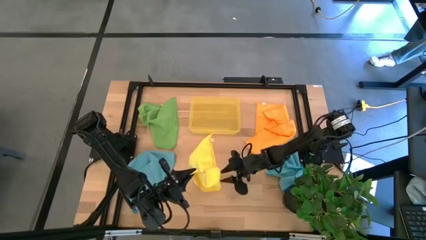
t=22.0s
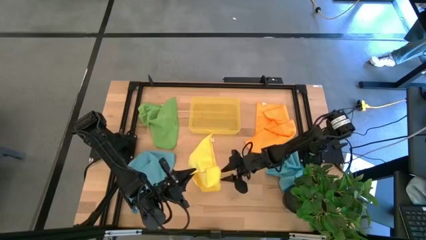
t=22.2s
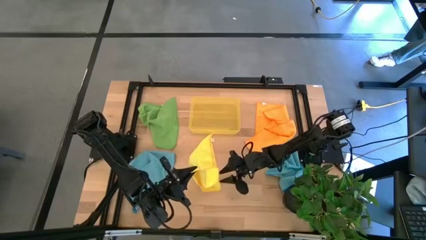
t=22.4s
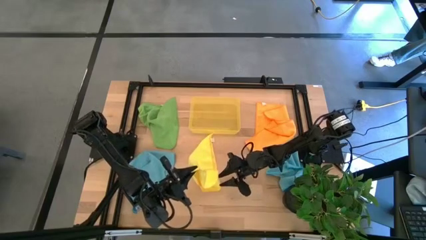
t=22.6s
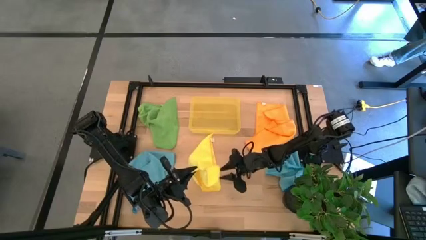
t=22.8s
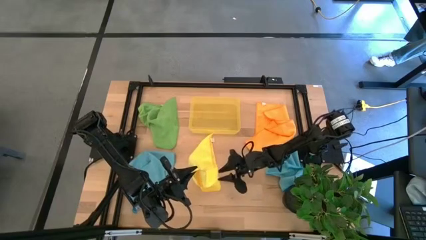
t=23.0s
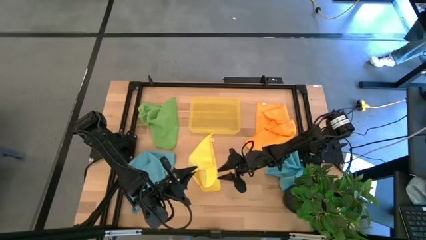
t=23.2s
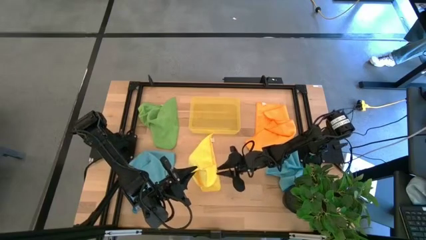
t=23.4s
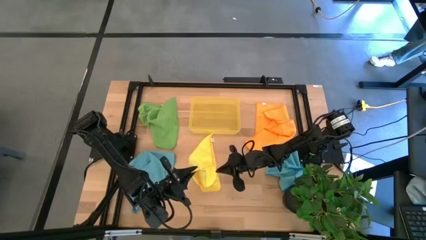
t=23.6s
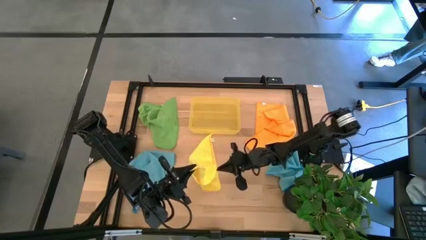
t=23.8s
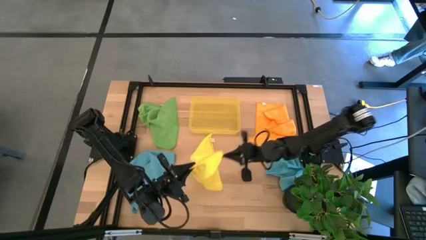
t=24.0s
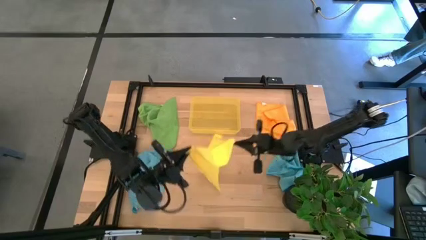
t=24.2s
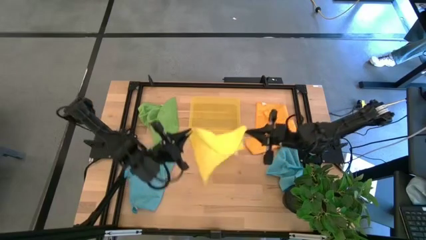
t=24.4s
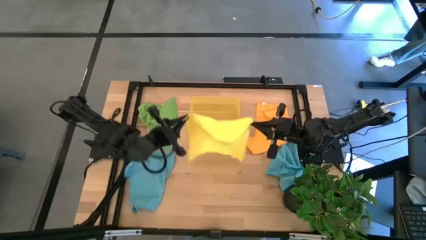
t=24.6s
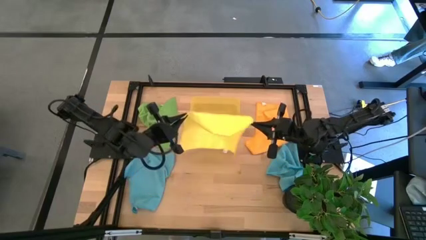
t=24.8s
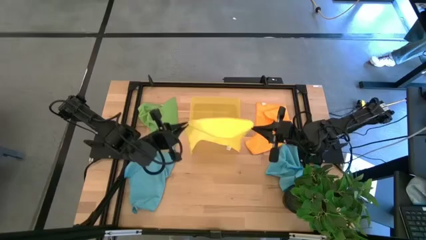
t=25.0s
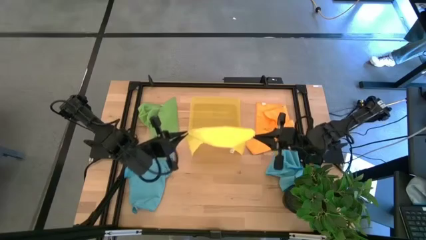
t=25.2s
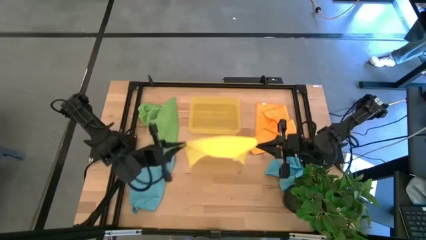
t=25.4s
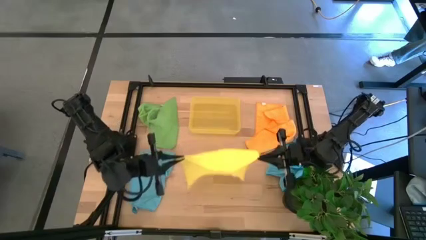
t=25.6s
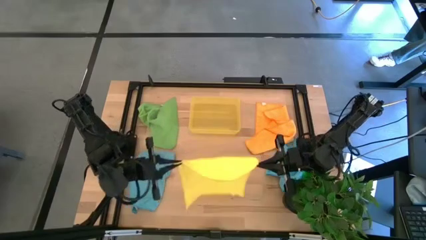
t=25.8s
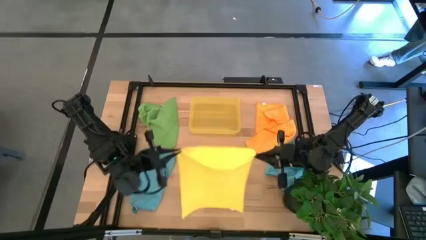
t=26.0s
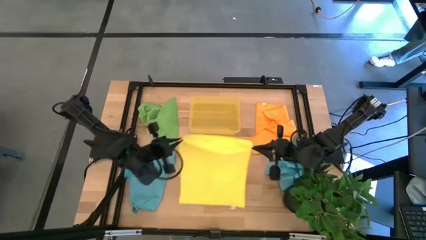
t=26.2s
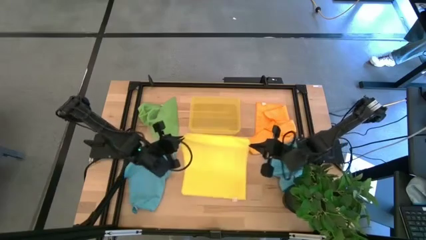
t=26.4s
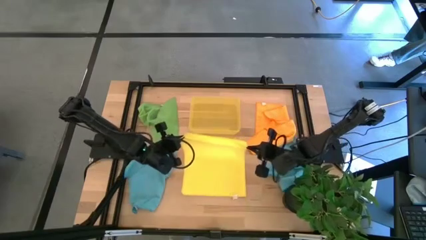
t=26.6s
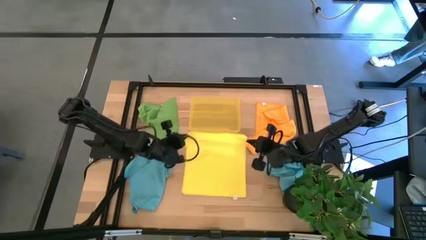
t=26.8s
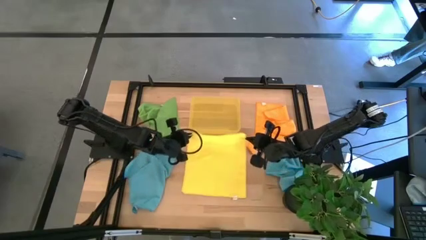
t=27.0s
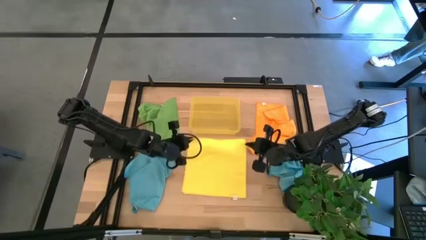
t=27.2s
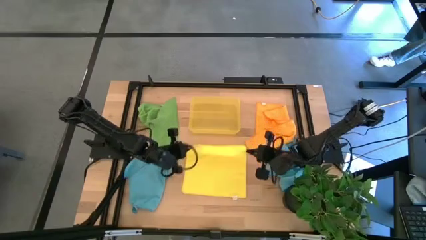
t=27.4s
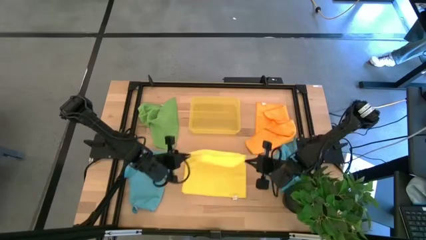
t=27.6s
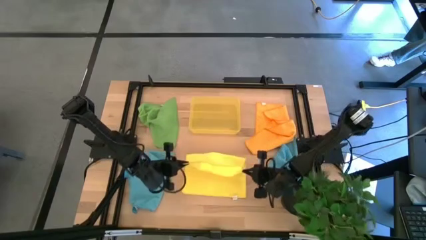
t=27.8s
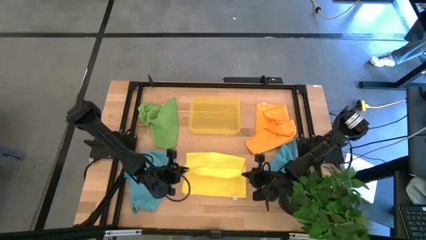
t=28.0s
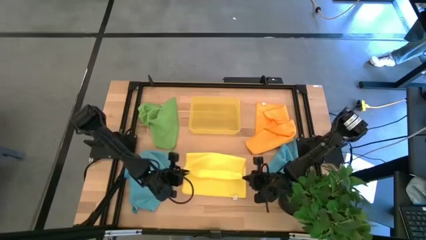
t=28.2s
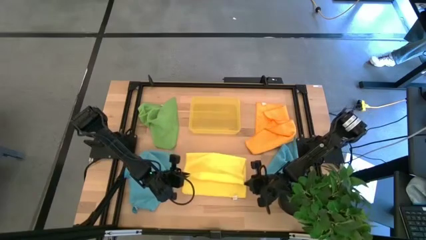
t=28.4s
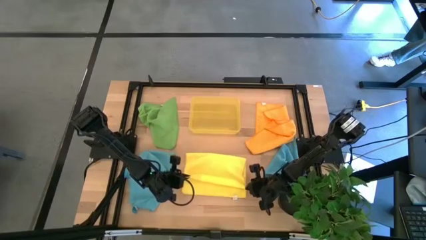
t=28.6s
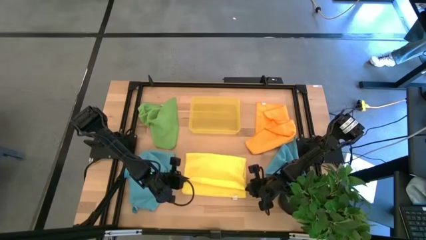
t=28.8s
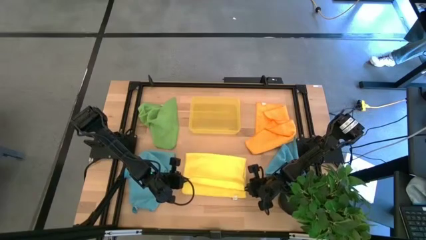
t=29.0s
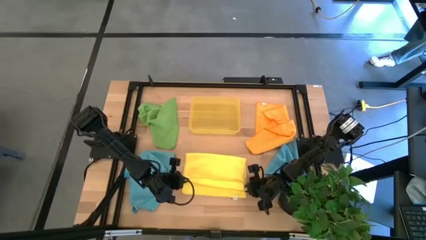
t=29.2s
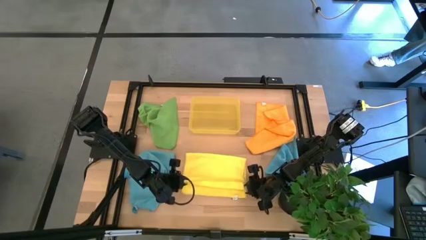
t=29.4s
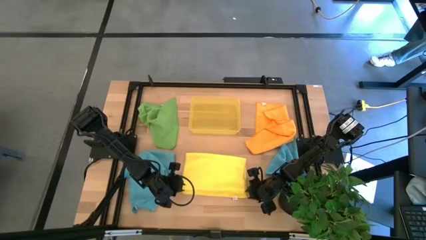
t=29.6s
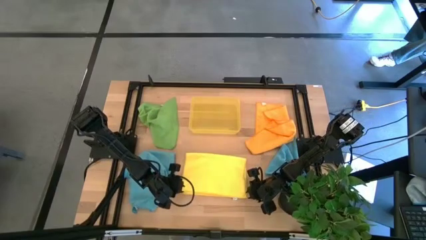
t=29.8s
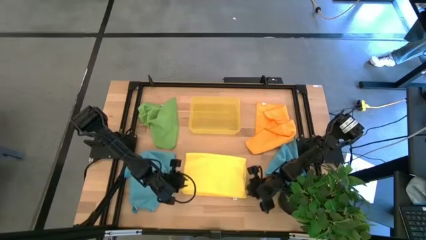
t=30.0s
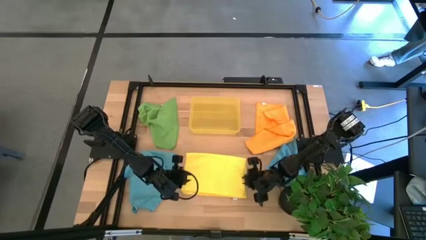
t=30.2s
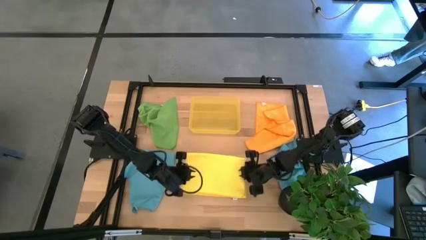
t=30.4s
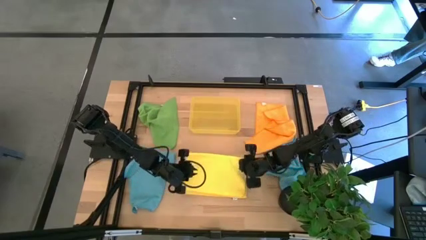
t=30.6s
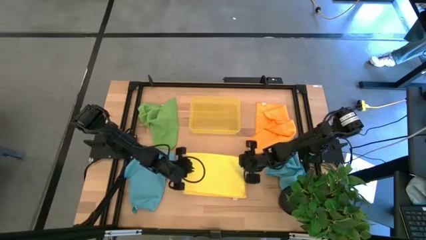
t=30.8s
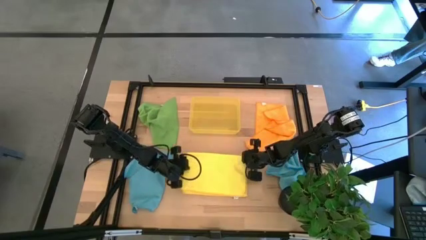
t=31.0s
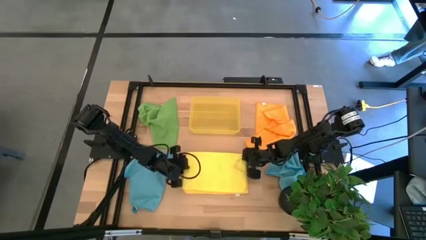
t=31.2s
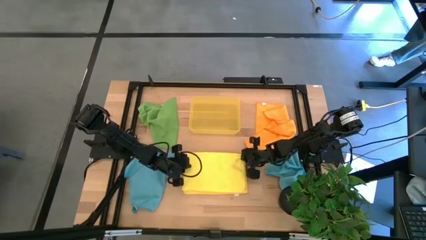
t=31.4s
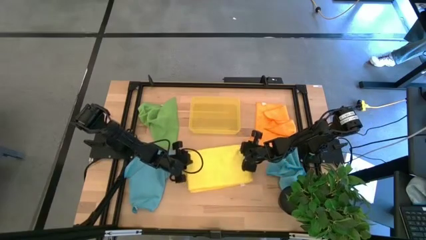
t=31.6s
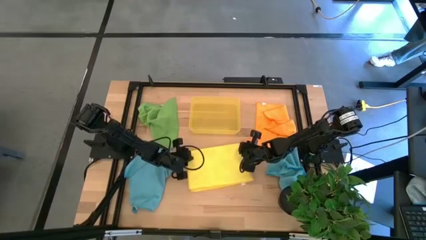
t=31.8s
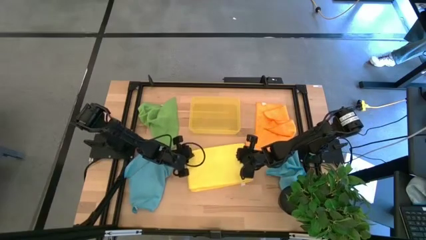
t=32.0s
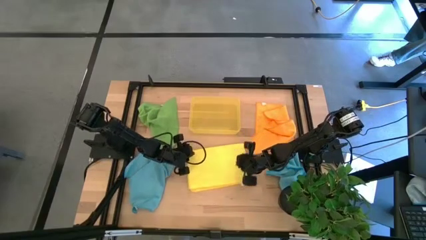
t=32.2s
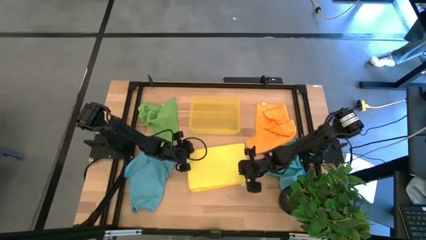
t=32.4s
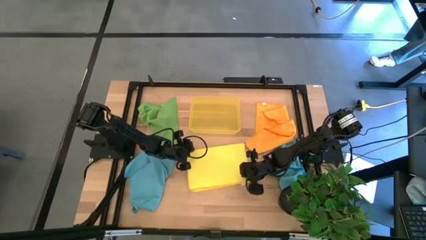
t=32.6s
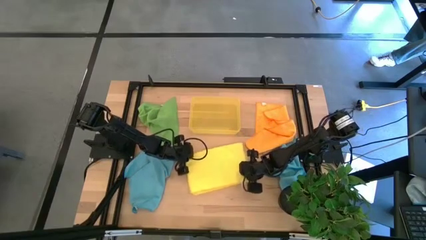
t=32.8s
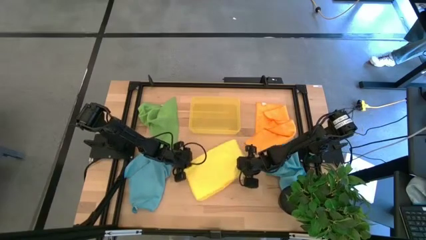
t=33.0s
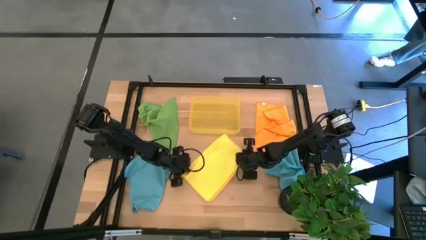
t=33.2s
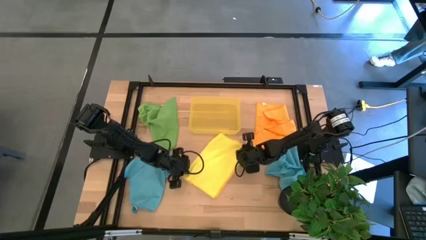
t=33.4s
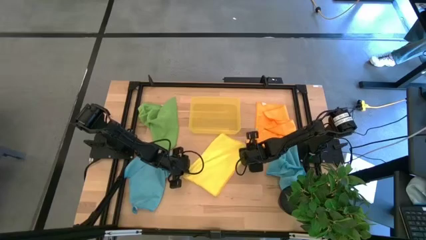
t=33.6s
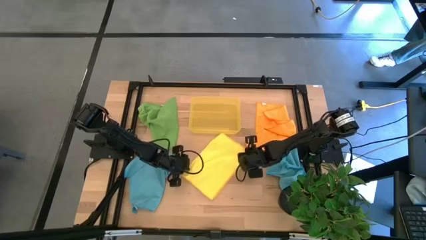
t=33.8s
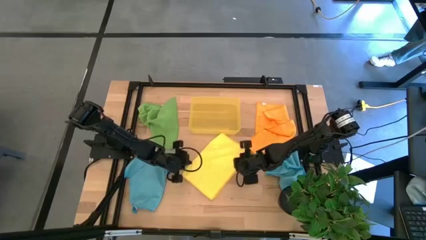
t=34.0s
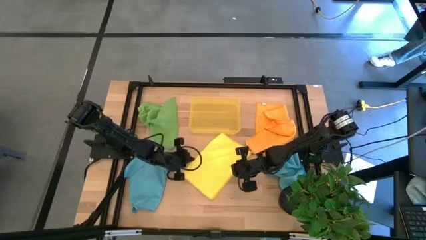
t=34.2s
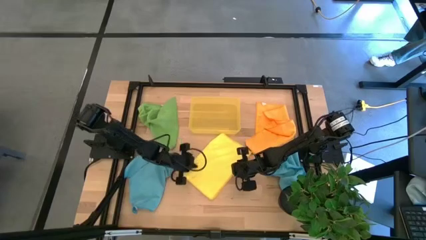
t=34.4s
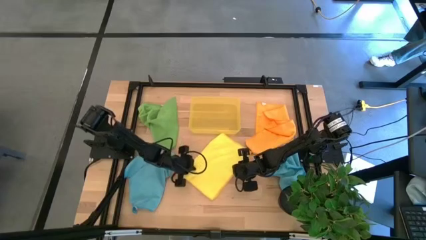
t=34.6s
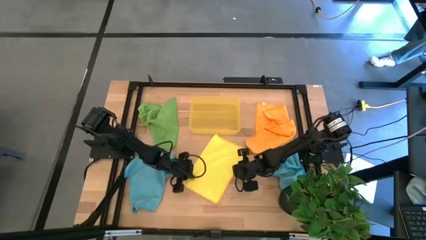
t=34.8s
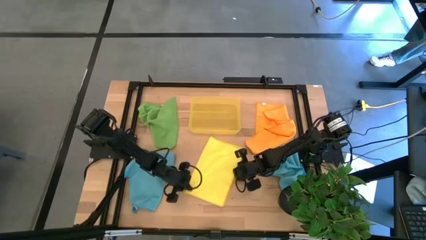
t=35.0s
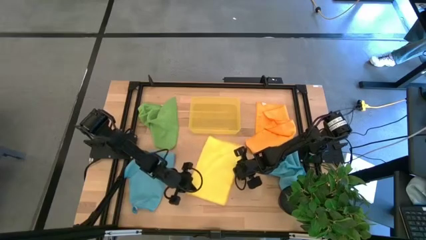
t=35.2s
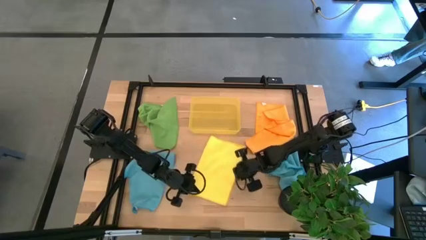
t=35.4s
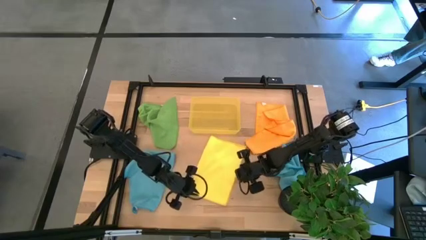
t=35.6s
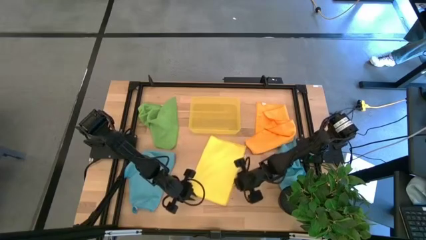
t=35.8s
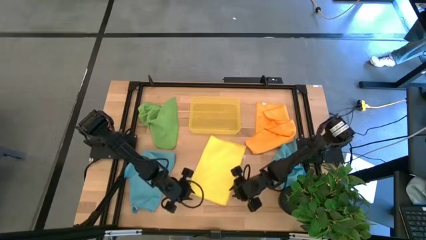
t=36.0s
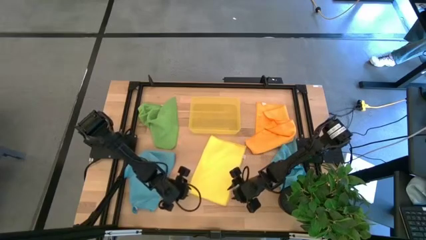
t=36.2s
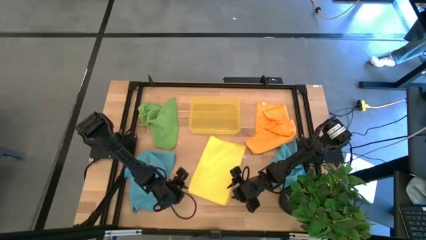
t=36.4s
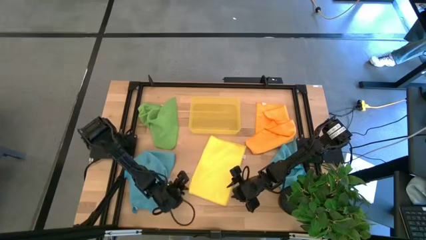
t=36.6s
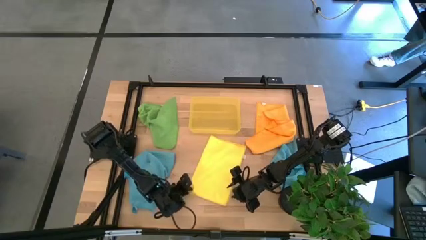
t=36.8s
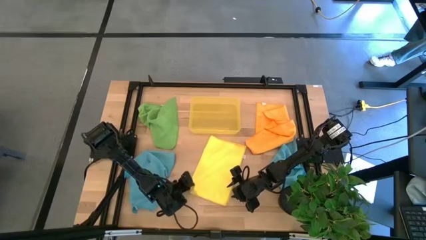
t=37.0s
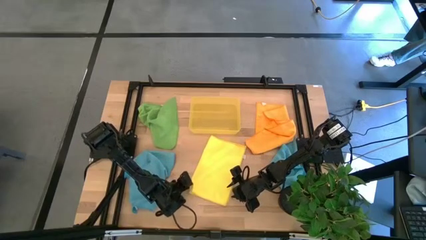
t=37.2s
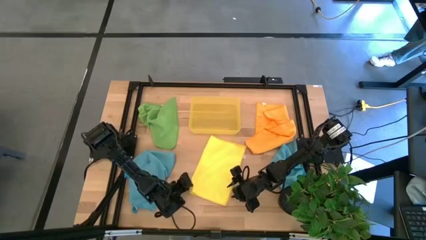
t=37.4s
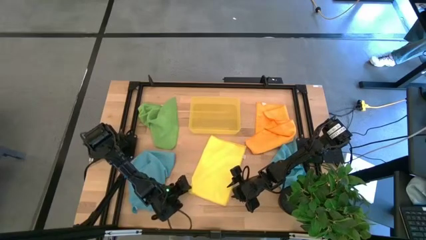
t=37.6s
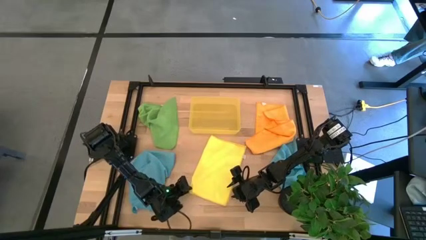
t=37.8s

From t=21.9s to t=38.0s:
Task: Fold microfiber towels
Fold the yellow towel
